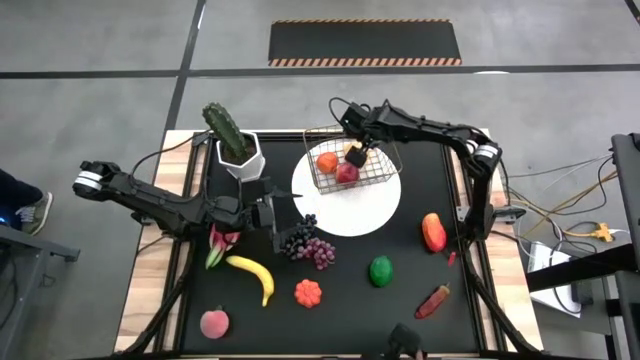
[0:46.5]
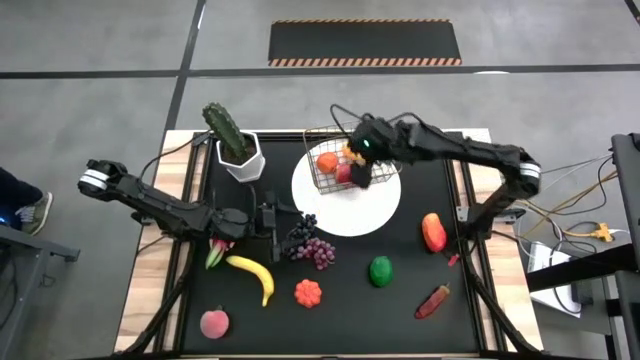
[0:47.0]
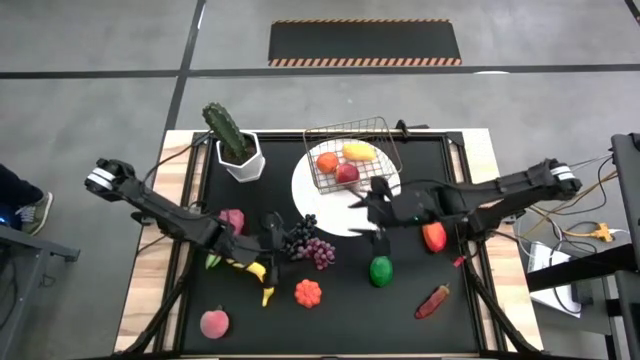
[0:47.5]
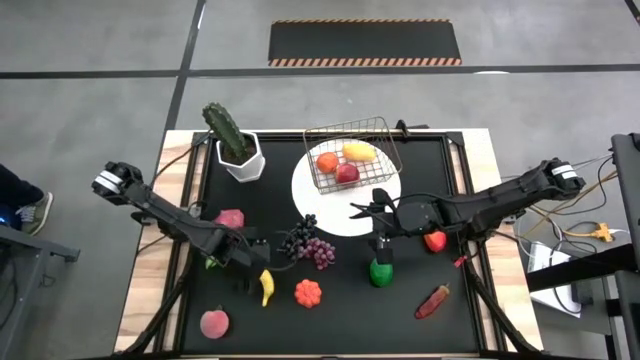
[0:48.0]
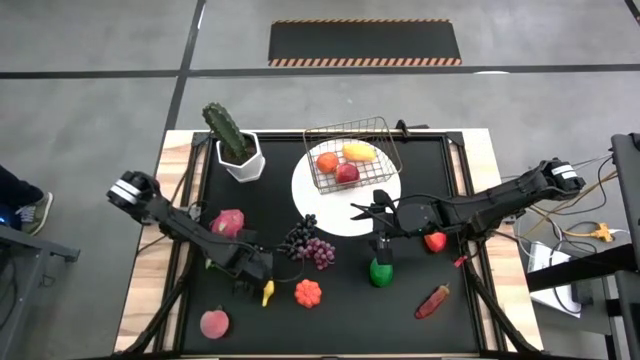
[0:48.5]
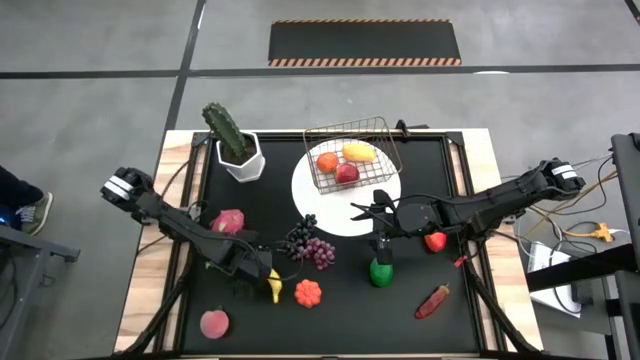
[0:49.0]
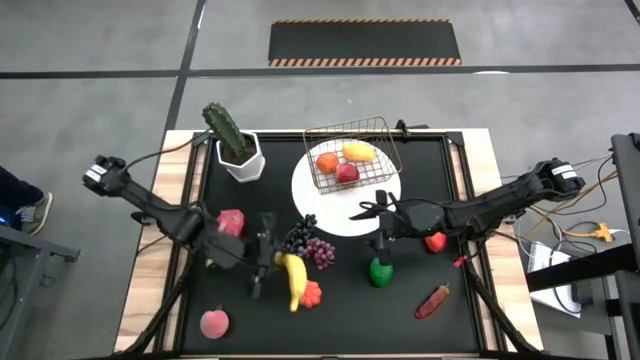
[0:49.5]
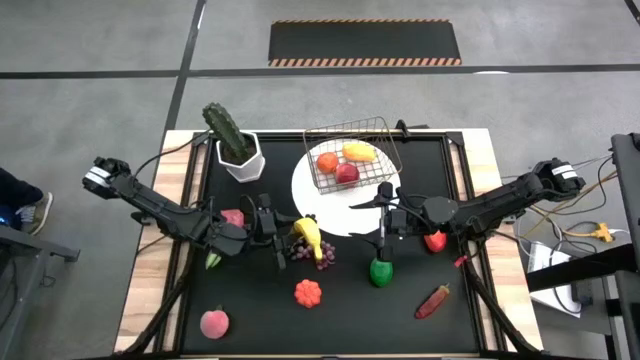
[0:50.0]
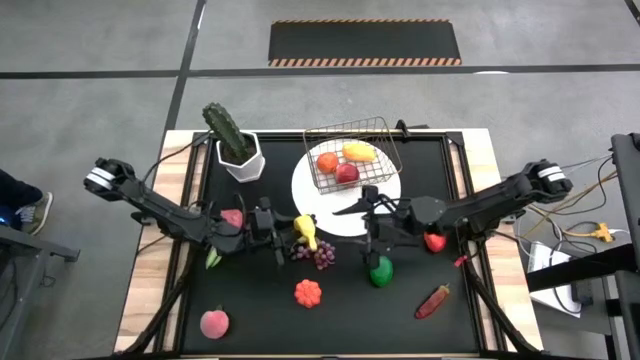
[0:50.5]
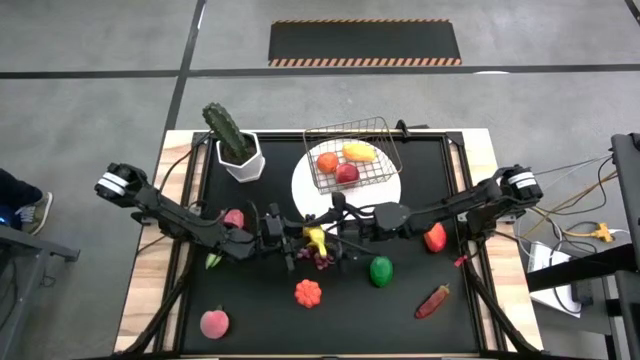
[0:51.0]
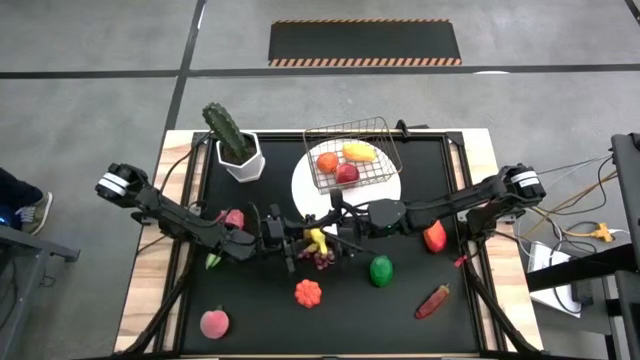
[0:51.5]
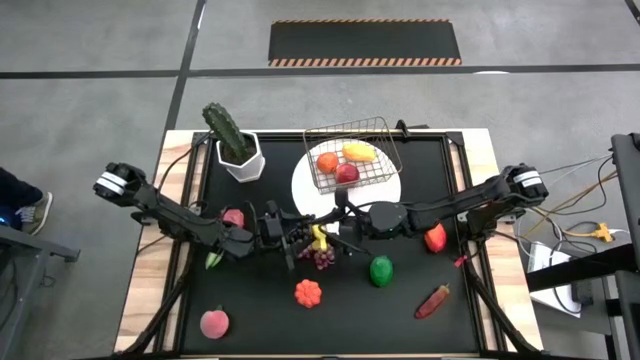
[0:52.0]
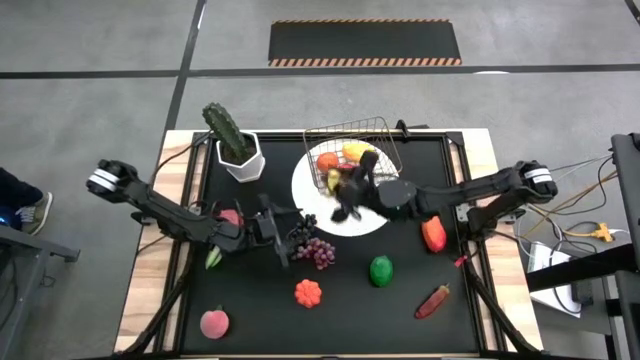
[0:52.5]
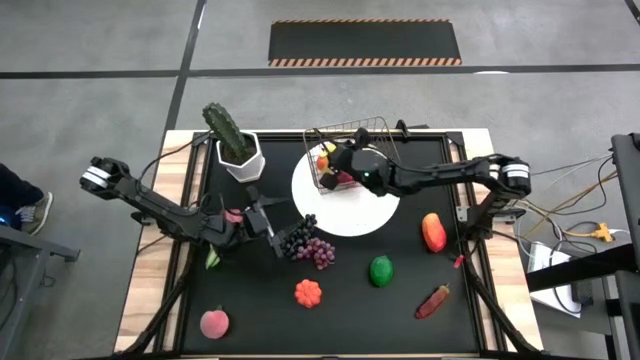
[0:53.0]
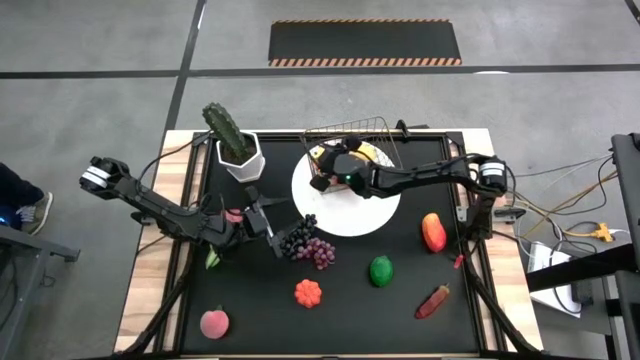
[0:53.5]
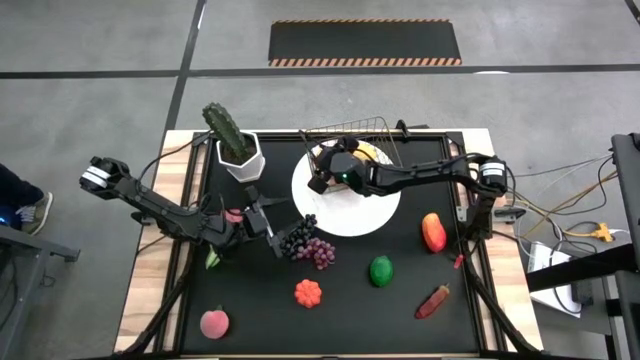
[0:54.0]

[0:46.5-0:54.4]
Task: Build produce basket
Put the yellow banana into the wire basket

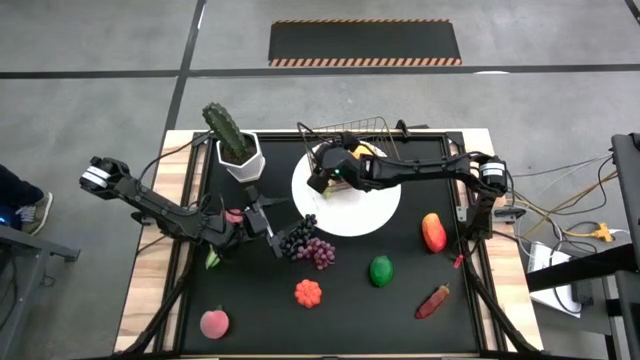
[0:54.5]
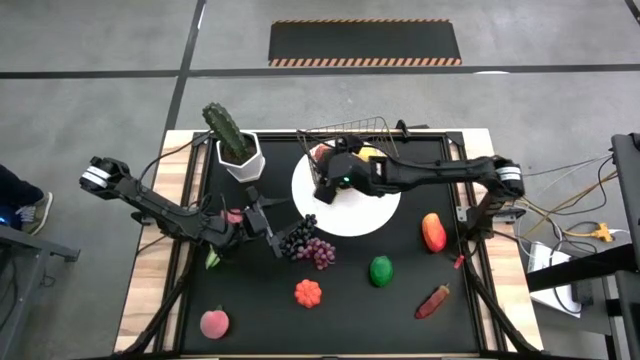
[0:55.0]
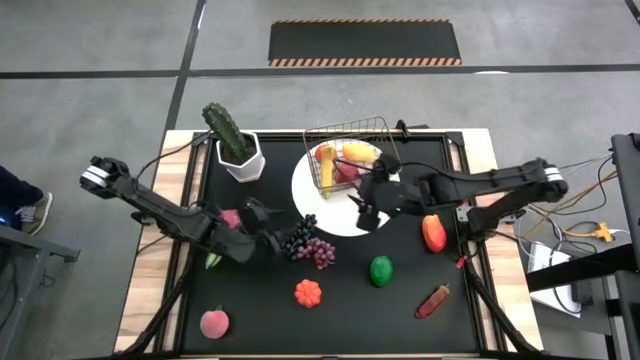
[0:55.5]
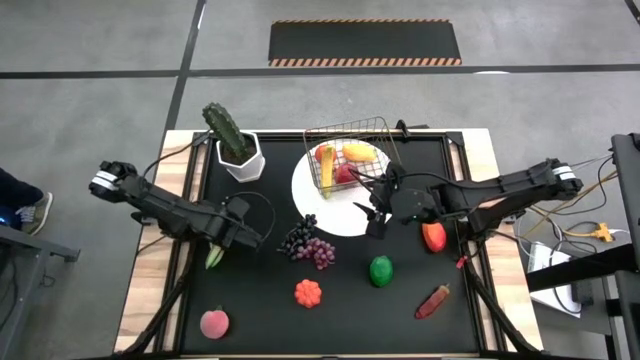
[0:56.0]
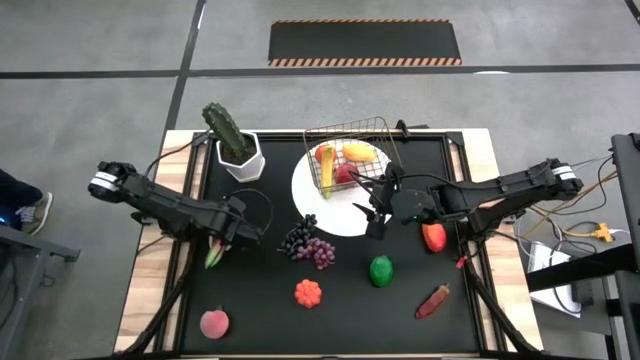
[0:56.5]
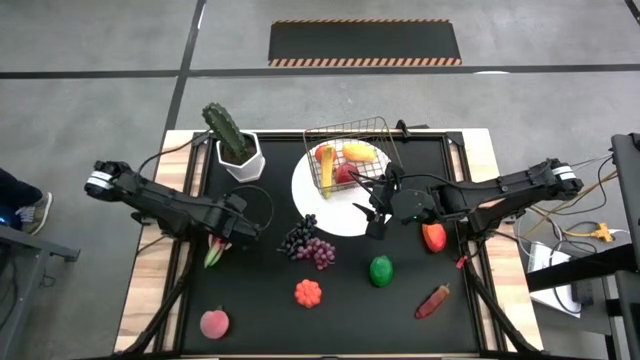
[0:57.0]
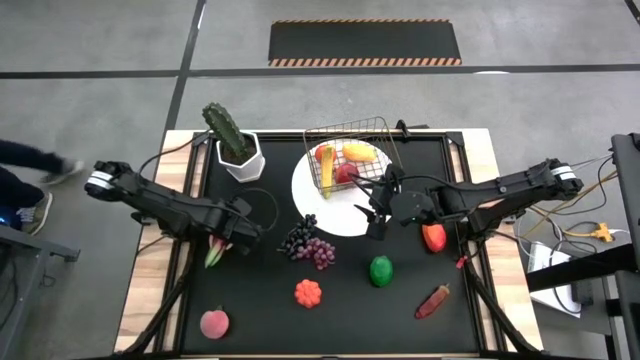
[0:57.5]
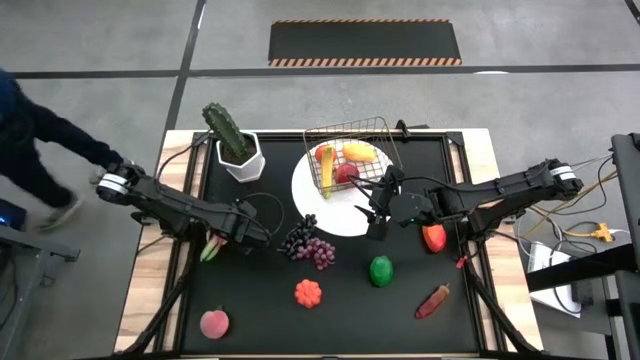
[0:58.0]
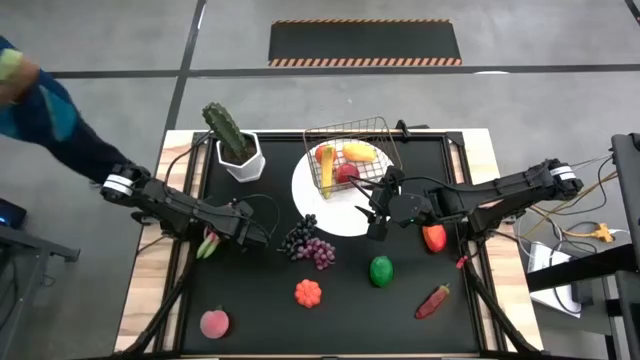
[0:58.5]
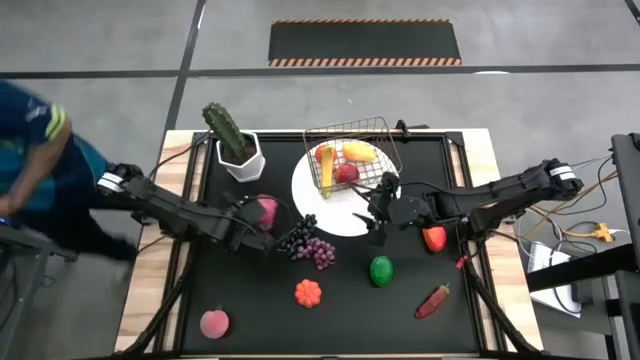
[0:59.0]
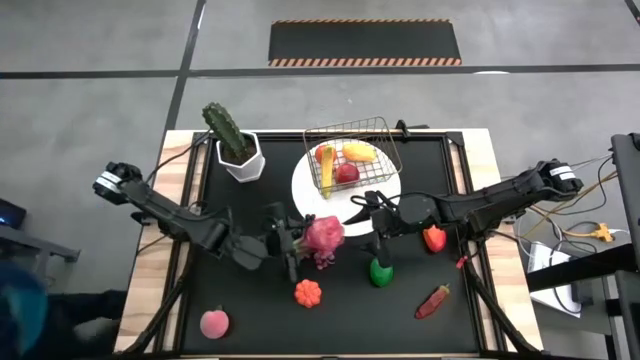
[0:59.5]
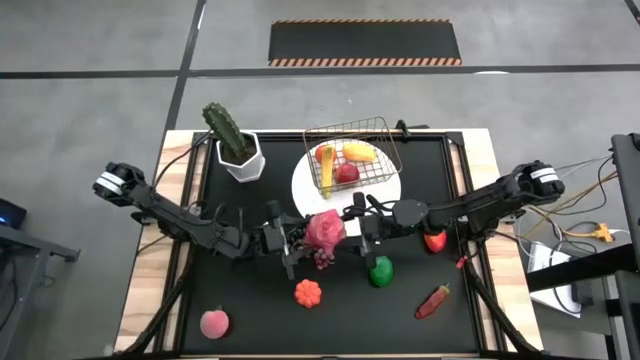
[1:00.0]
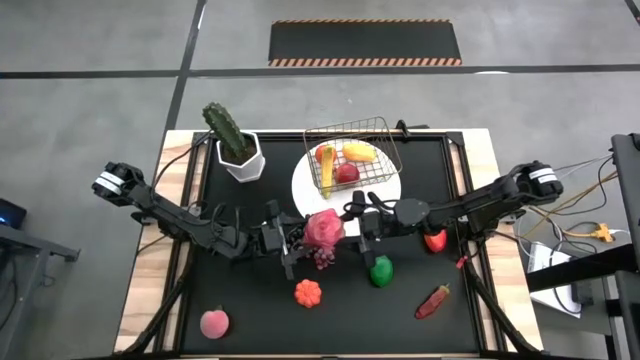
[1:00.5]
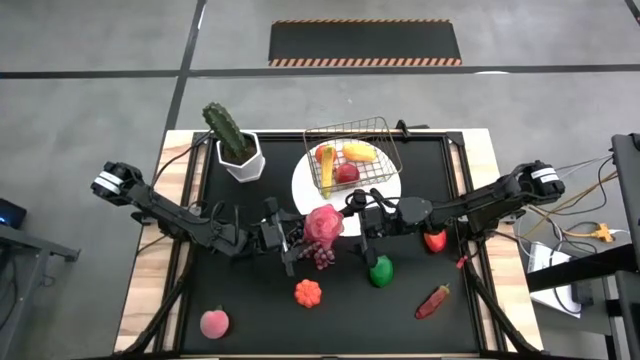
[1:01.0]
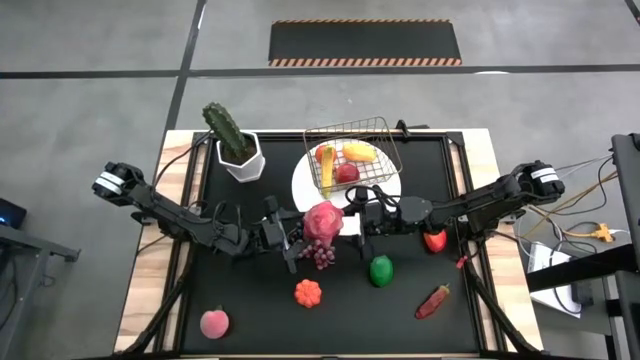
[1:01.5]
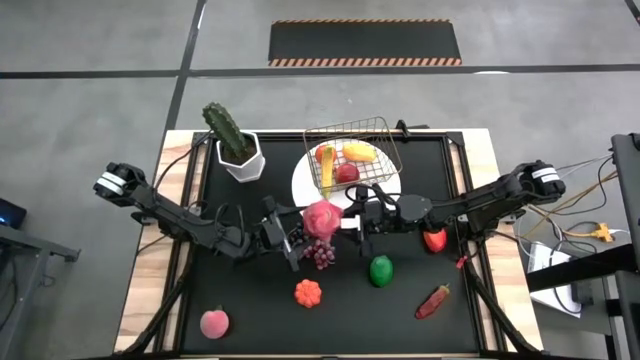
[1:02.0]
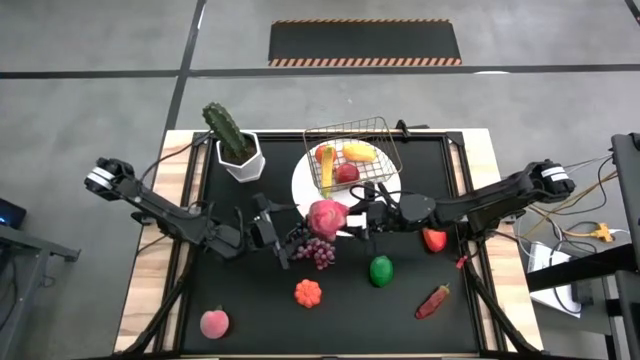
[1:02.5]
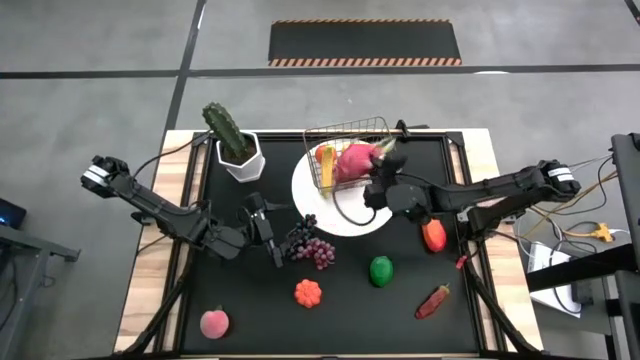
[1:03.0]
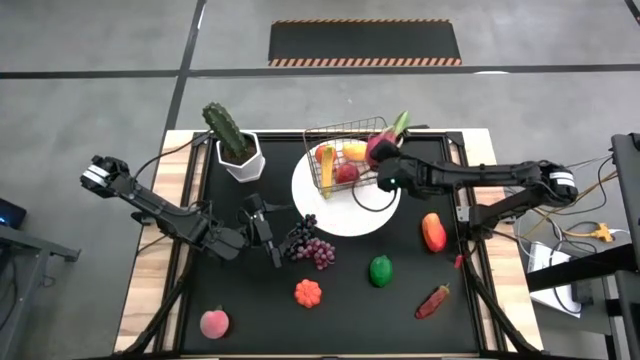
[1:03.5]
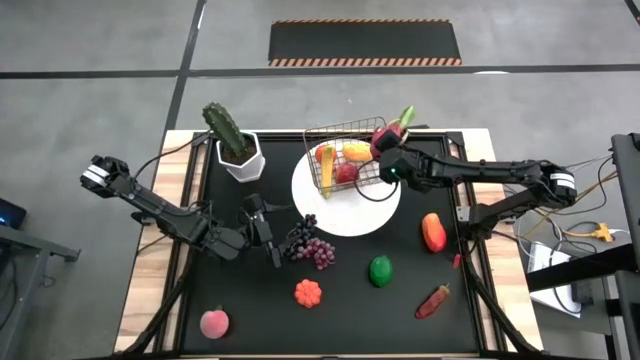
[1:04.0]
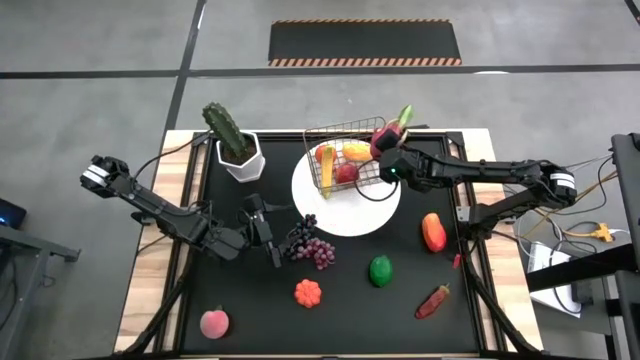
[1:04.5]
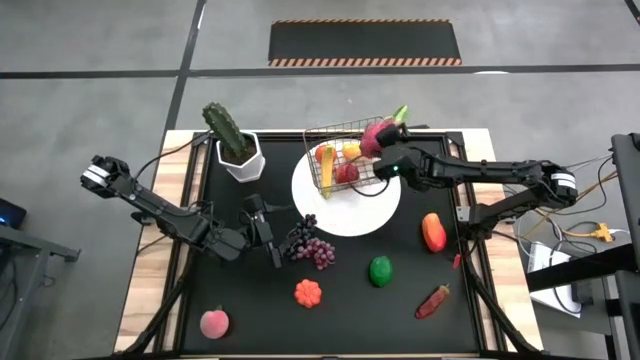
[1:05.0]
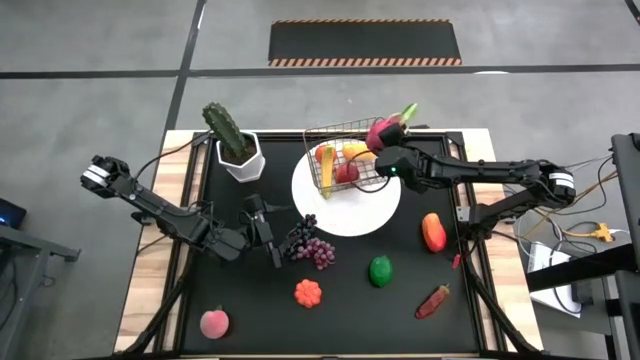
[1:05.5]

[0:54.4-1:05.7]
Put the red dragonfruit into the wire basket
